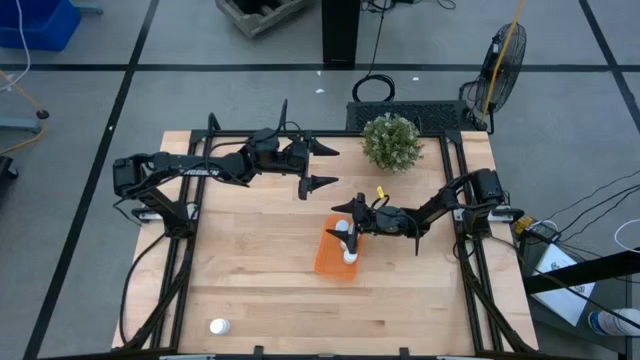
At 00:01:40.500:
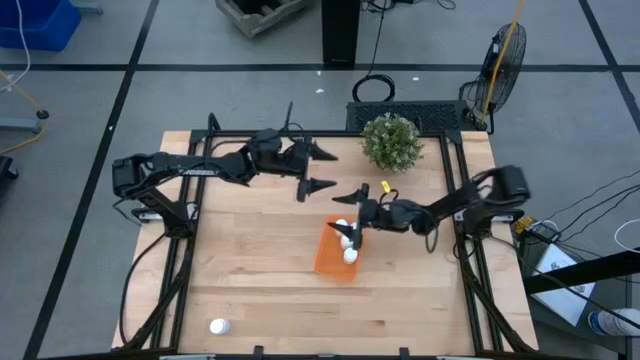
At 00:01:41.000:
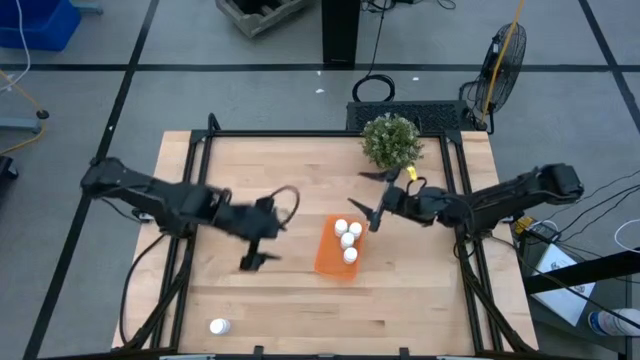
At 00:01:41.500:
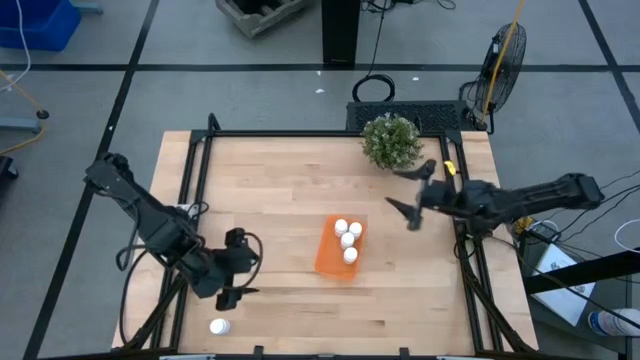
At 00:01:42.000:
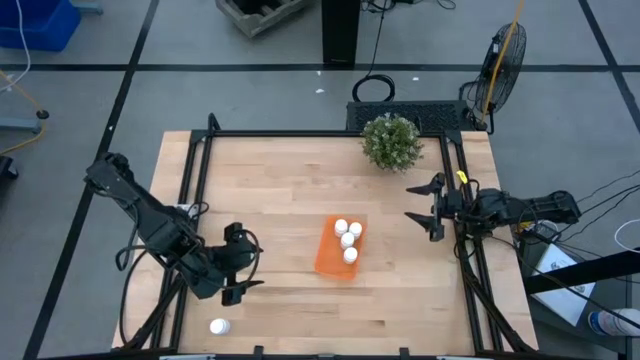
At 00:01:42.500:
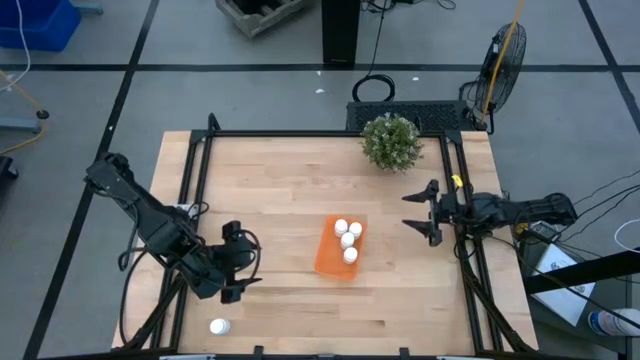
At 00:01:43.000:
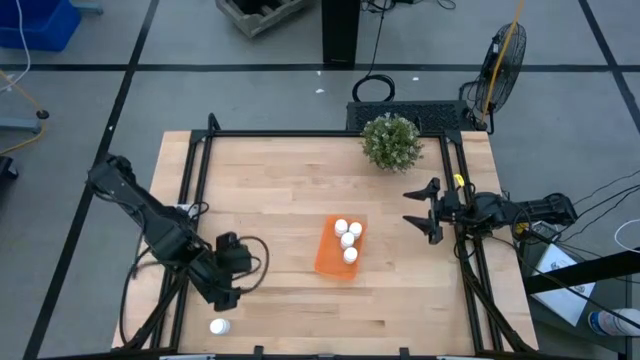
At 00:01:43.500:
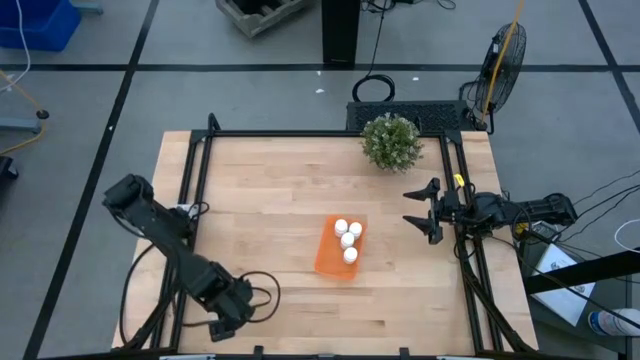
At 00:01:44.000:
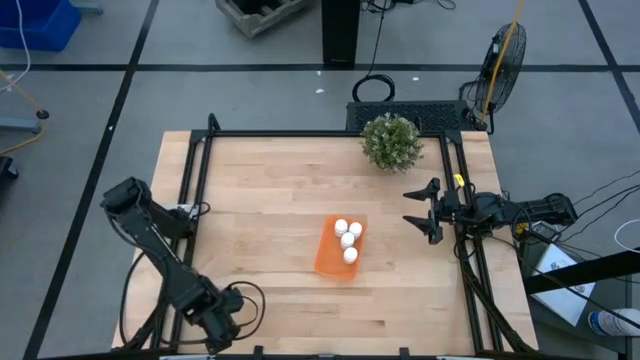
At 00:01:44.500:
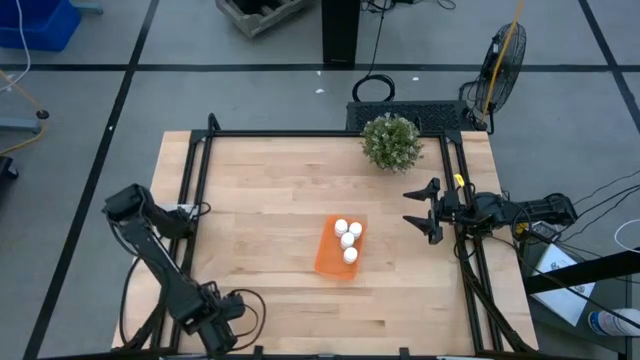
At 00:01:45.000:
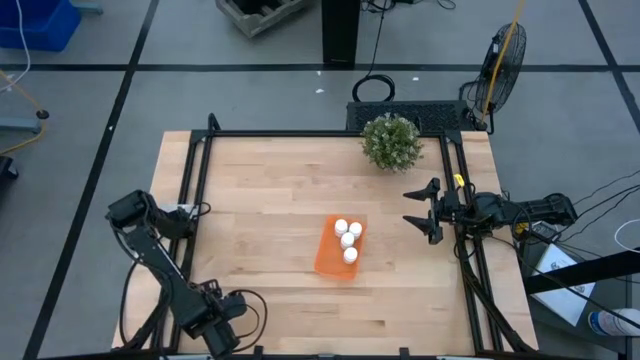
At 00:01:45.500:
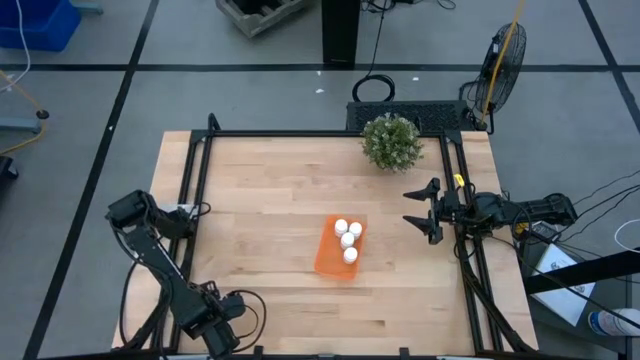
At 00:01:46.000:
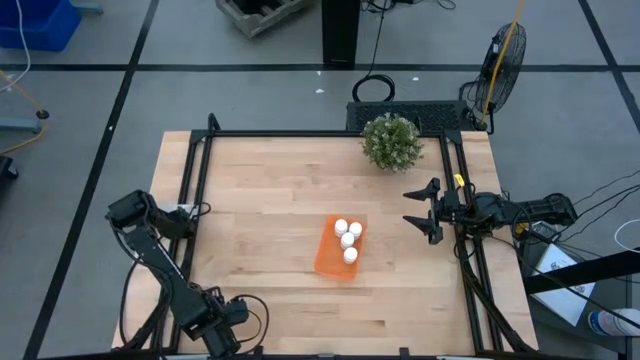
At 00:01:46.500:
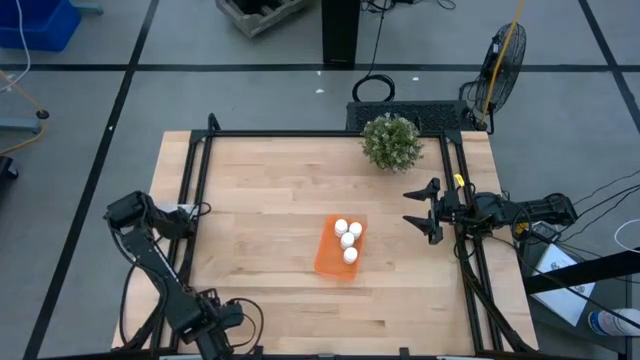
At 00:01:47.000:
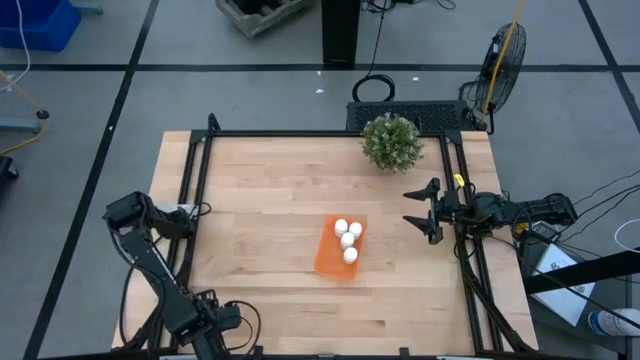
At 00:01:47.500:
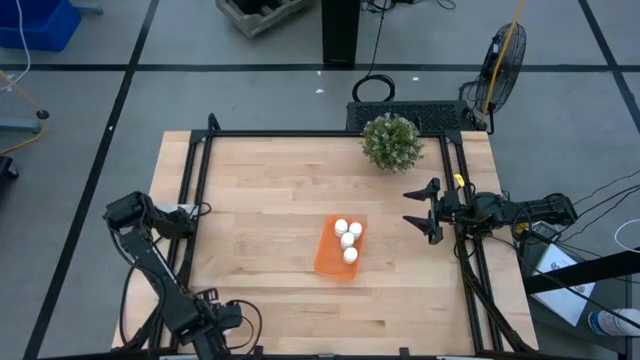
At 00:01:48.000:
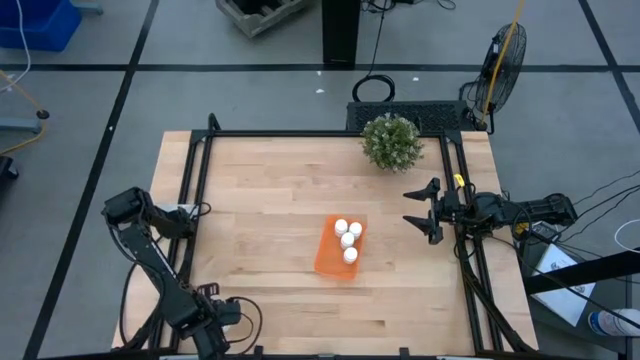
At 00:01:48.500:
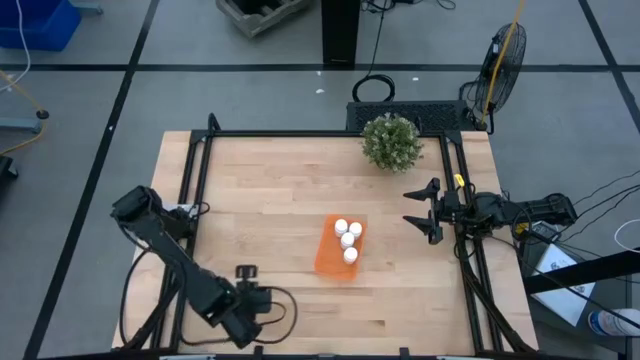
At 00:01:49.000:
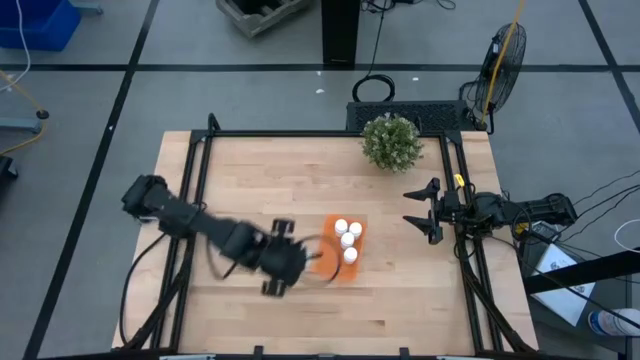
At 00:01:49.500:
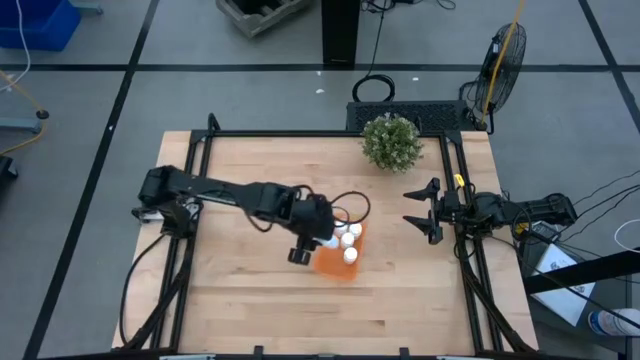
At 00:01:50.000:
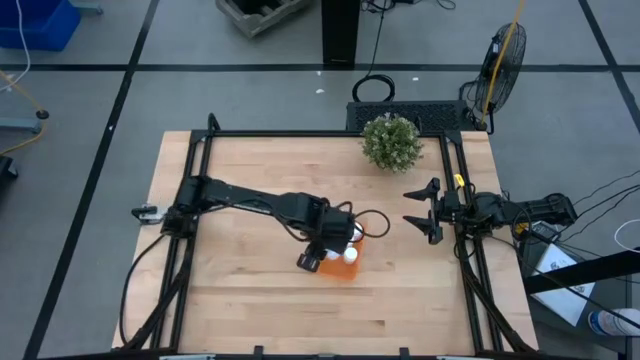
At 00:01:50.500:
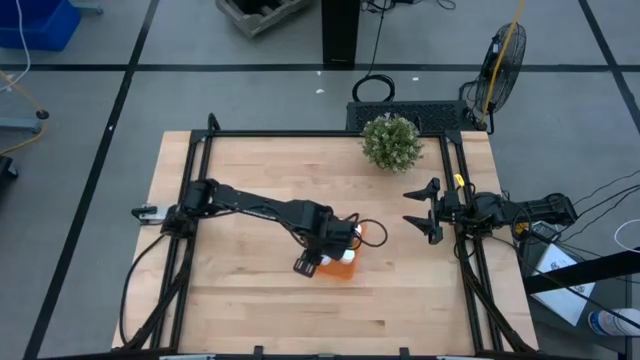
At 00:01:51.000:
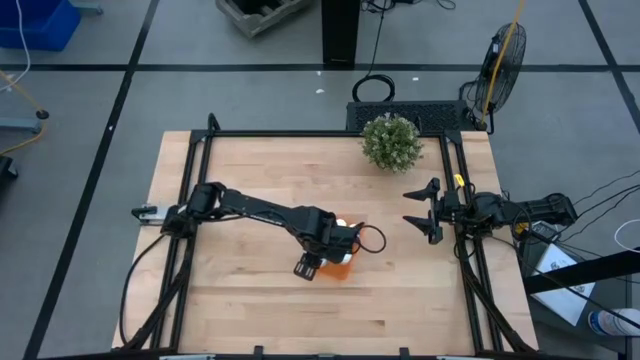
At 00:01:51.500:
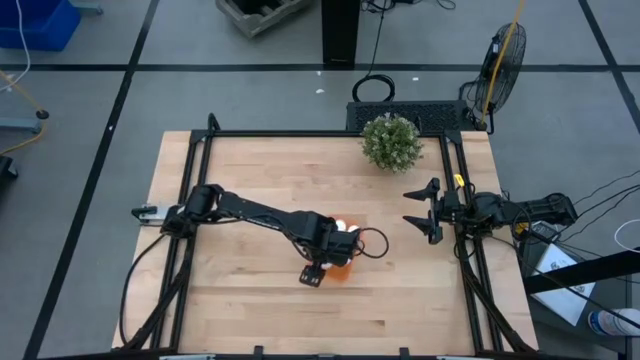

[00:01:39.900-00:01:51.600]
Task: Pick and place pill bottles into a basket
Put the white pill bottle into the orange container

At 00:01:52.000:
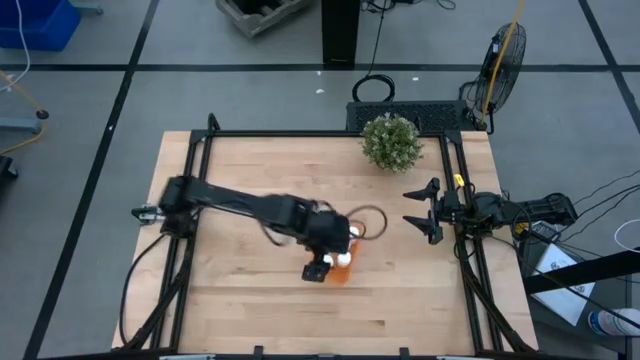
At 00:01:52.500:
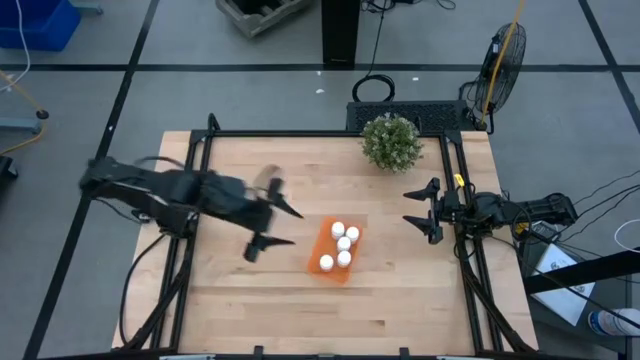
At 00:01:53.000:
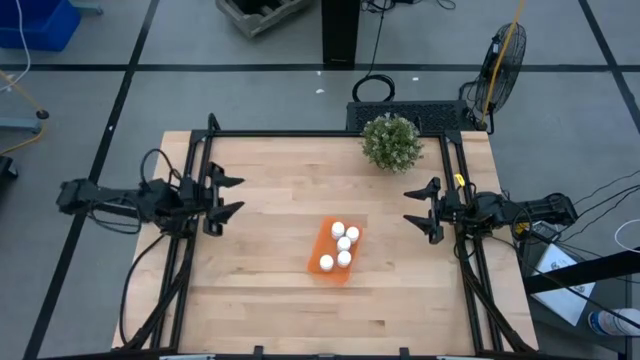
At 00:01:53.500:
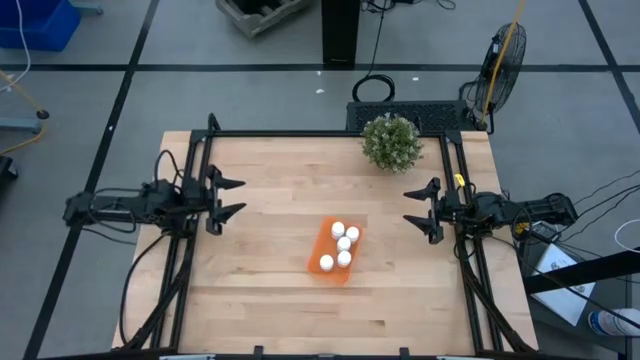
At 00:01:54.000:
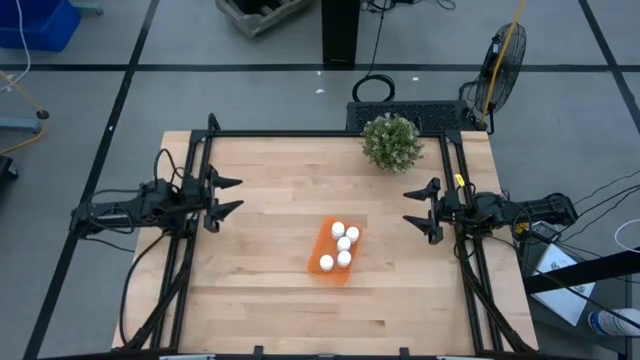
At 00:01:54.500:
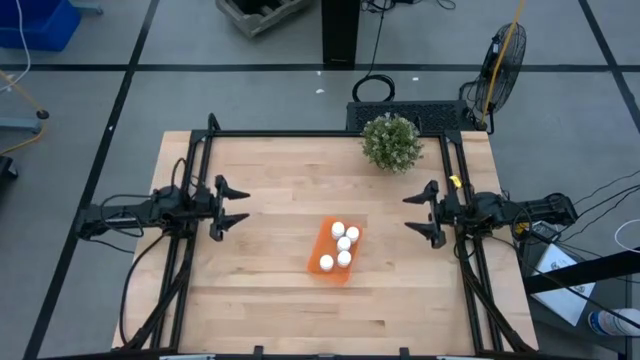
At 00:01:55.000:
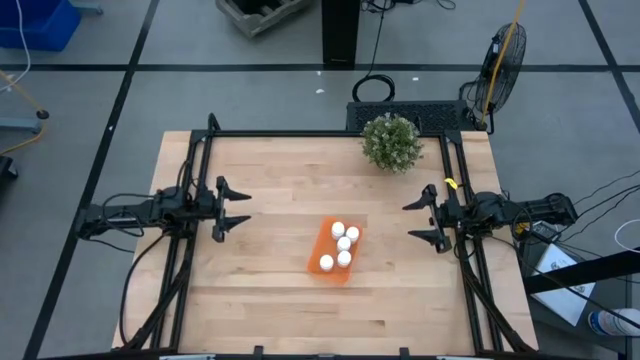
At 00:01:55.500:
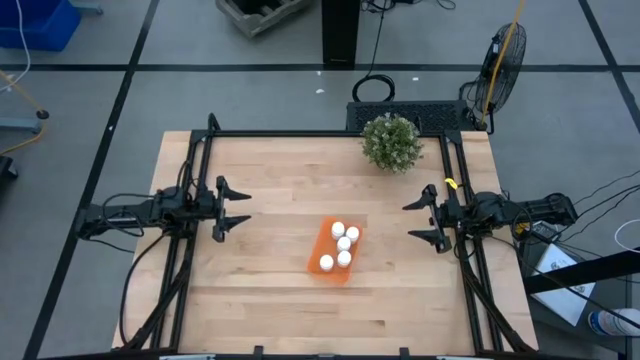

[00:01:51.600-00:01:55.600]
Return to Home Position

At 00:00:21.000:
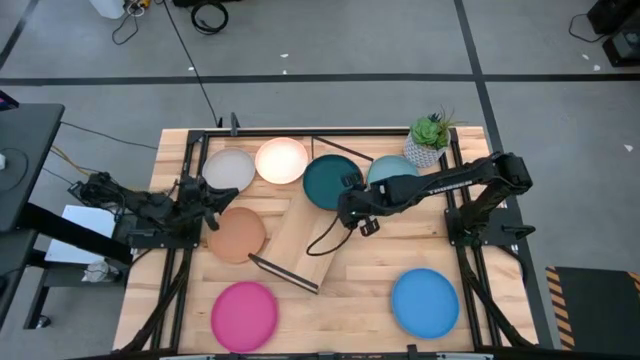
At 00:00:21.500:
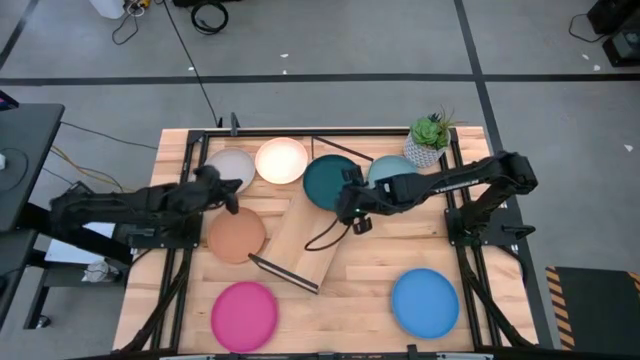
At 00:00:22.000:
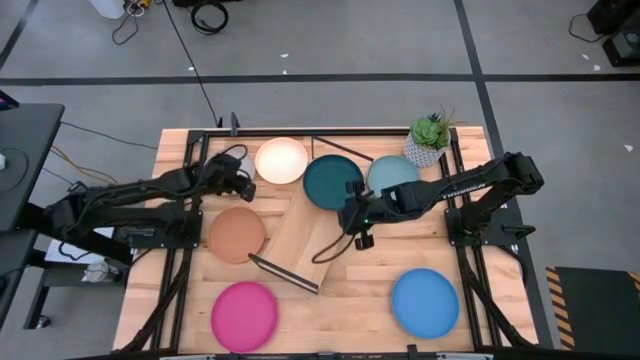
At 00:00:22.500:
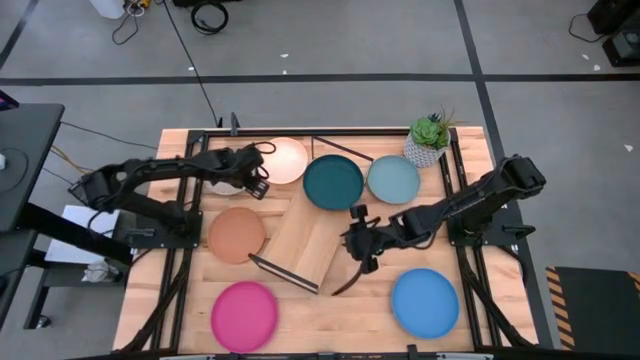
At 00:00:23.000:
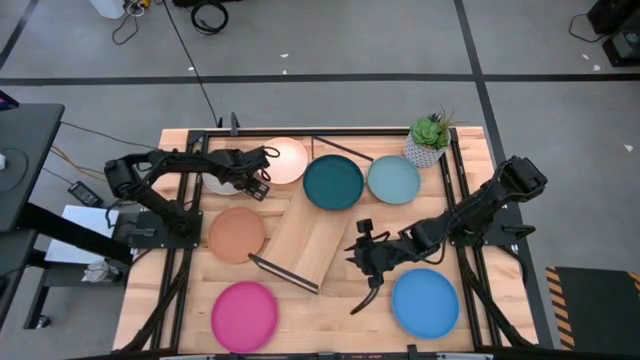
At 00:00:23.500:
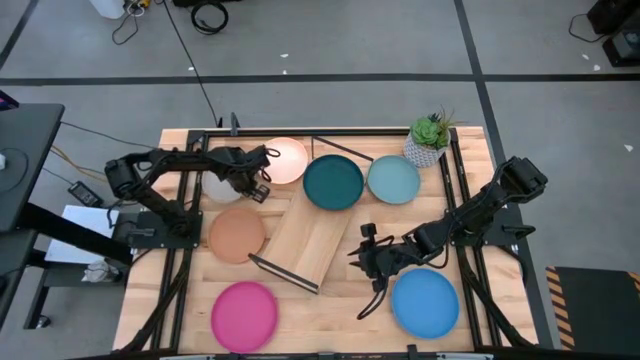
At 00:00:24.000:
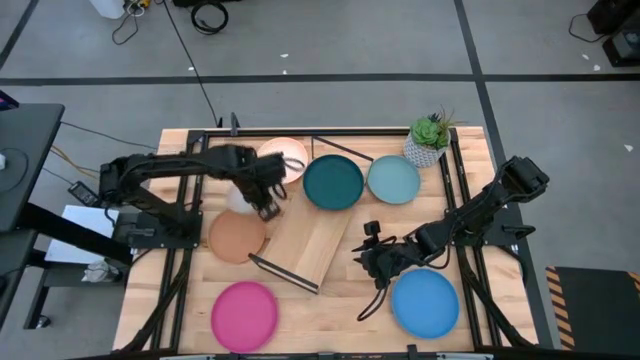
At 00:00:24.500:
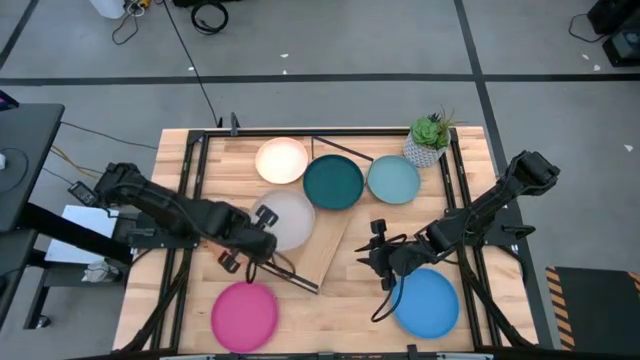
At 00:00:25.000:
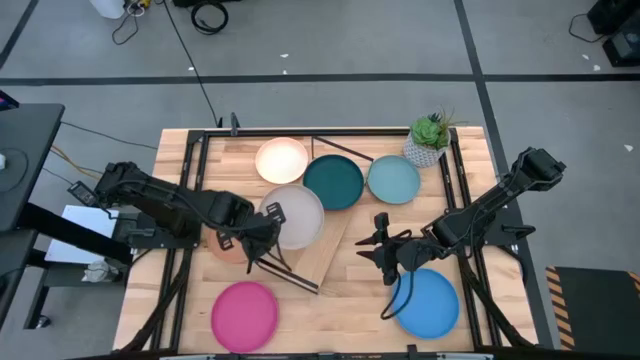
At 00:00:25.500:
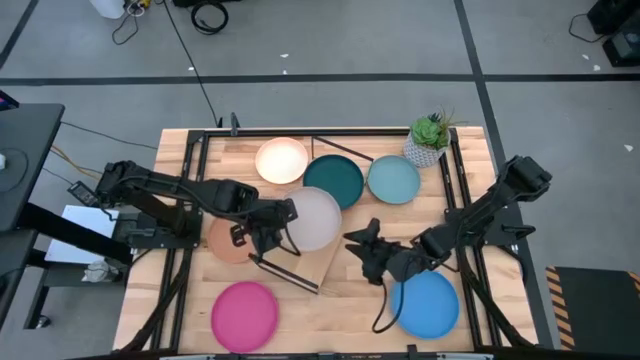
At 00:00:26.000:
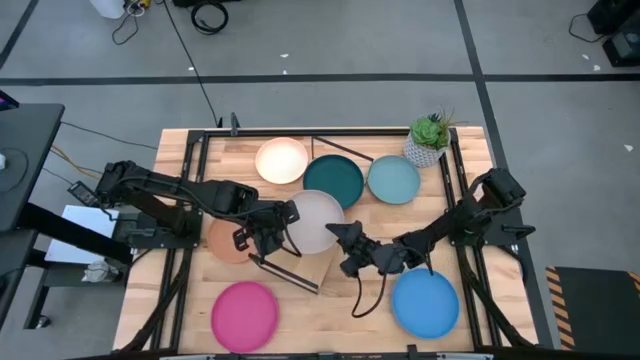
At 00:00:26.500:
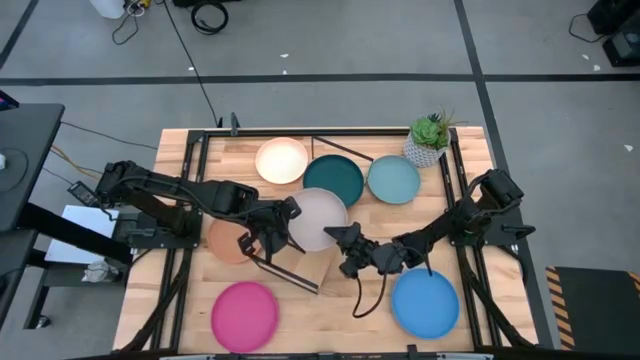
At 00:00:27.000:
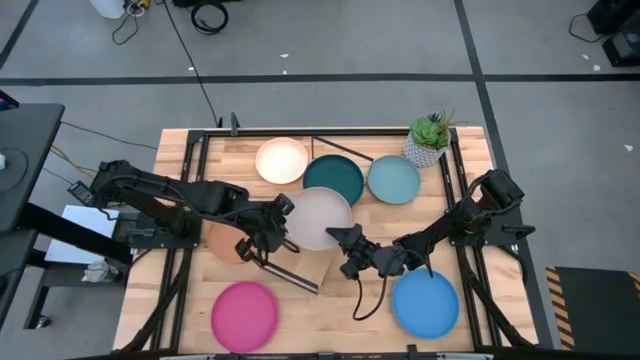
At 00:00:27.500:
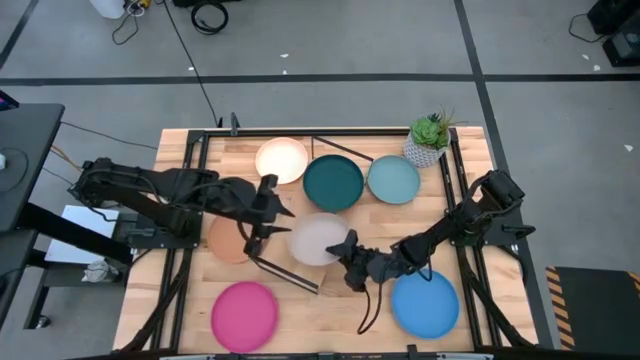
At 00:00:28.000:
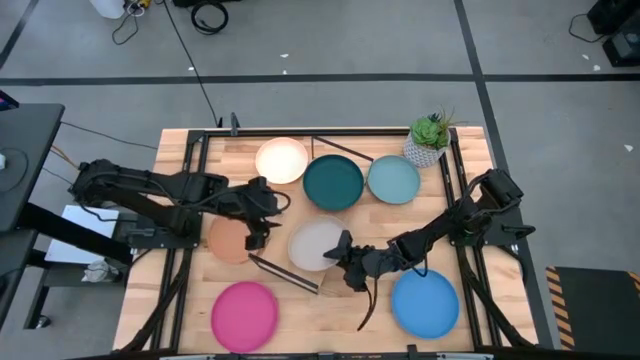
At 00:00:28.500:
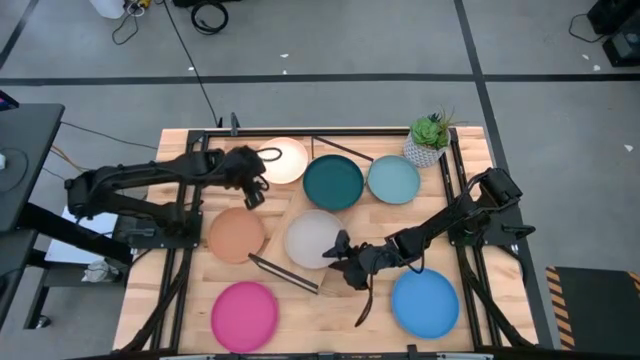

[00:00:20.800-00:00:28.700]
Task: Place and stack plates onto a shelf
Put the white plate on the shelf
